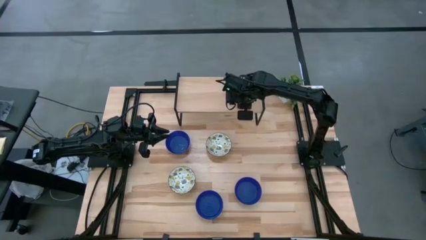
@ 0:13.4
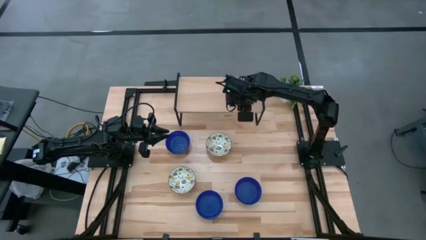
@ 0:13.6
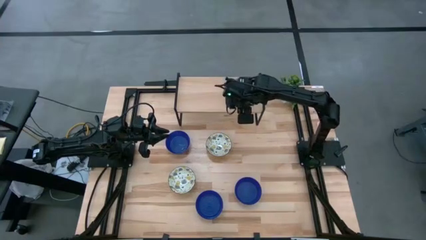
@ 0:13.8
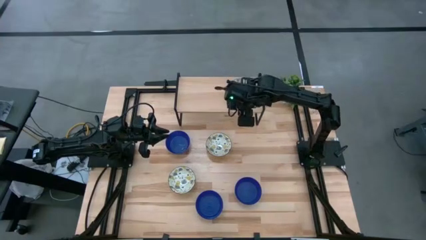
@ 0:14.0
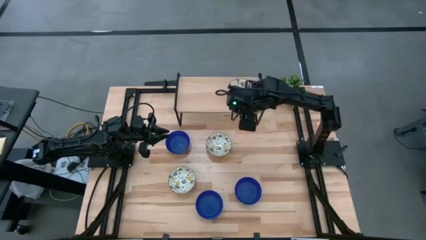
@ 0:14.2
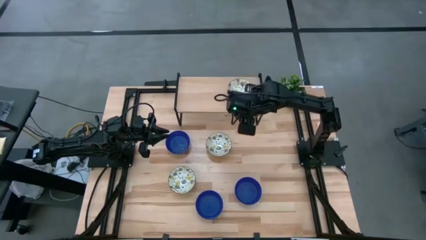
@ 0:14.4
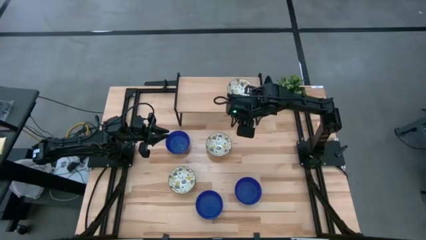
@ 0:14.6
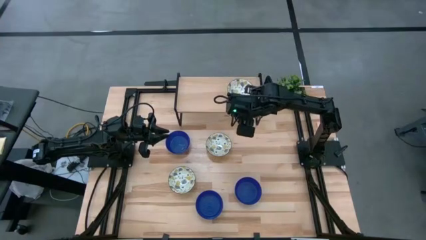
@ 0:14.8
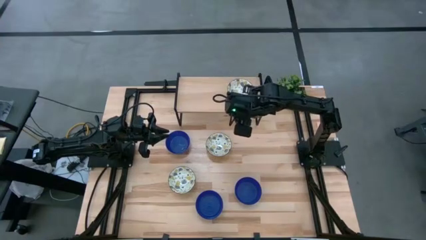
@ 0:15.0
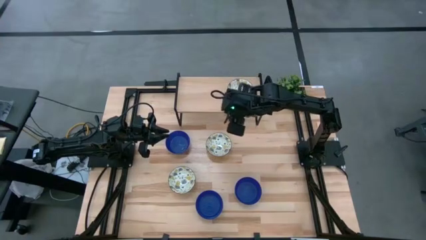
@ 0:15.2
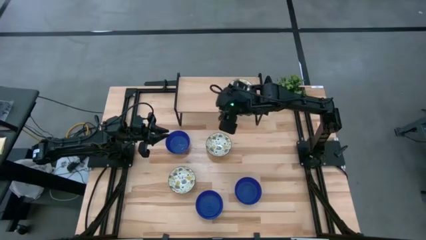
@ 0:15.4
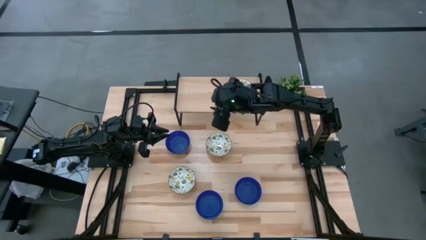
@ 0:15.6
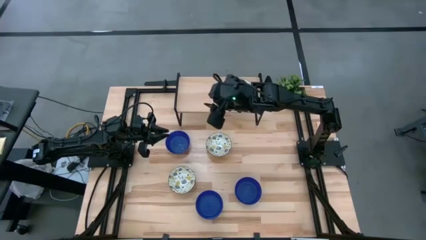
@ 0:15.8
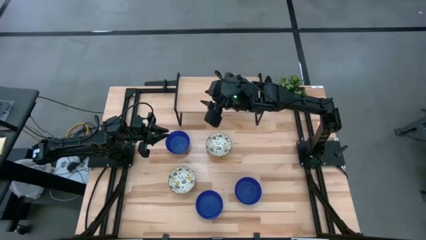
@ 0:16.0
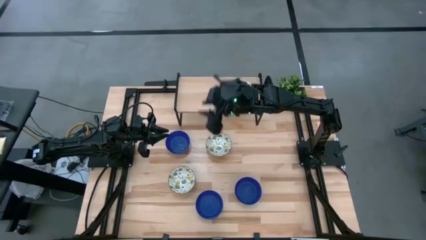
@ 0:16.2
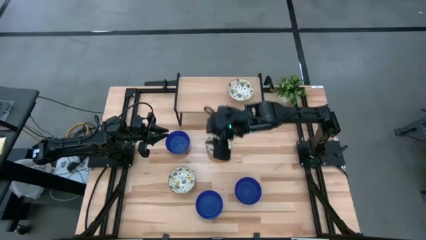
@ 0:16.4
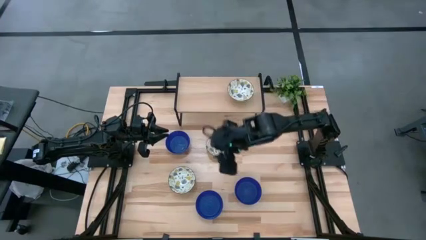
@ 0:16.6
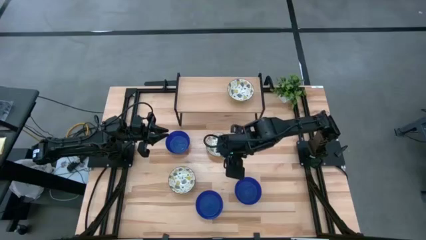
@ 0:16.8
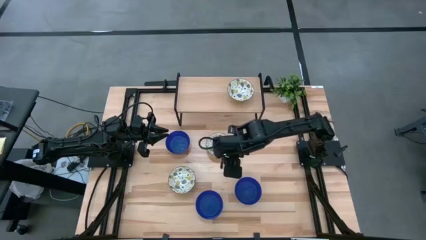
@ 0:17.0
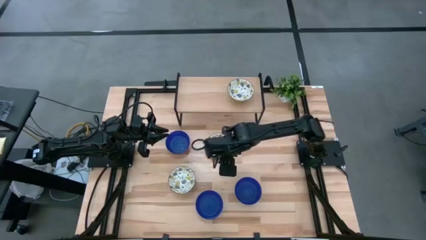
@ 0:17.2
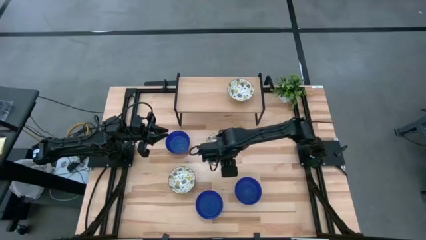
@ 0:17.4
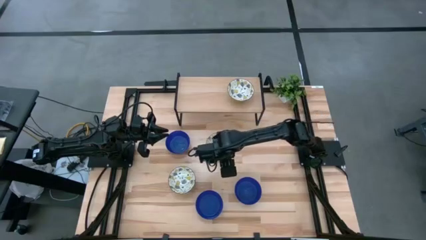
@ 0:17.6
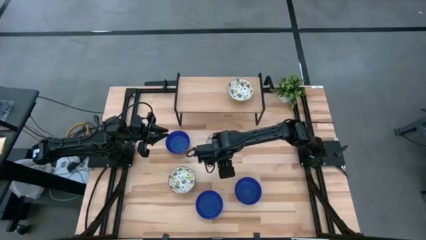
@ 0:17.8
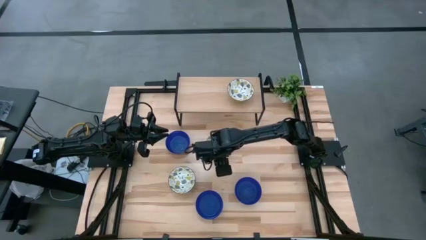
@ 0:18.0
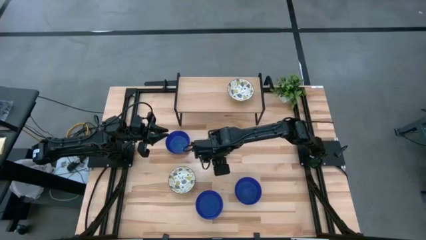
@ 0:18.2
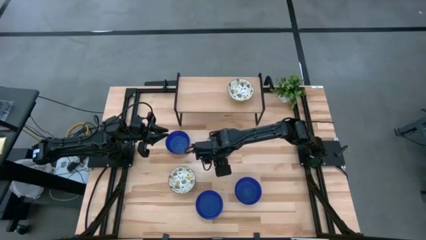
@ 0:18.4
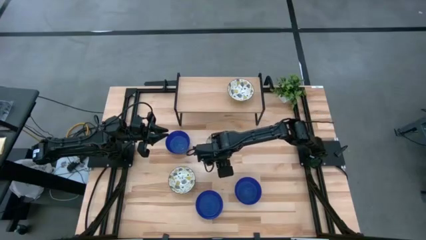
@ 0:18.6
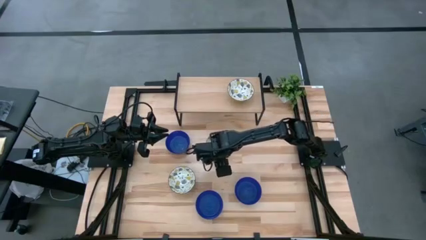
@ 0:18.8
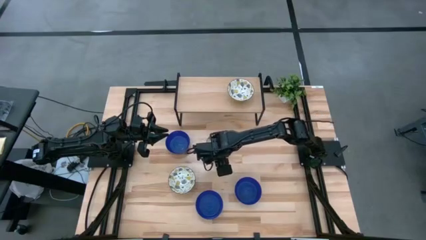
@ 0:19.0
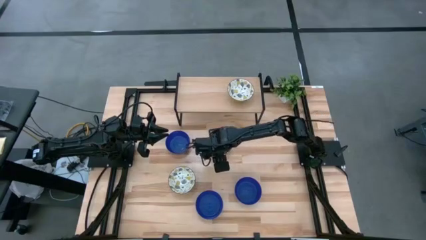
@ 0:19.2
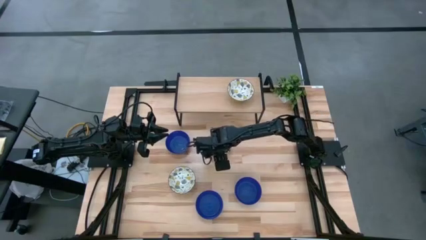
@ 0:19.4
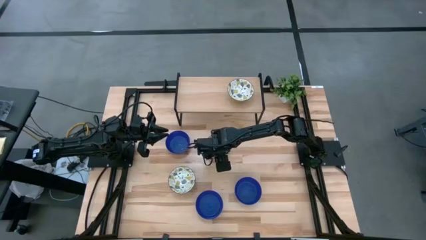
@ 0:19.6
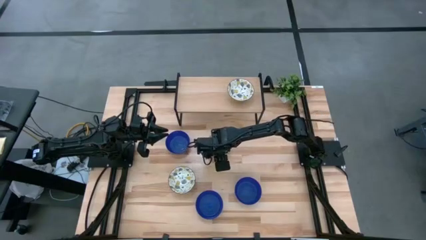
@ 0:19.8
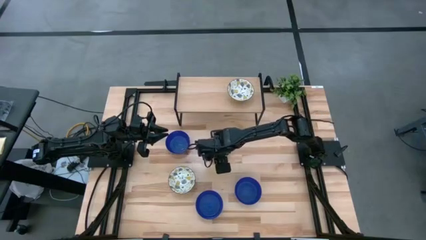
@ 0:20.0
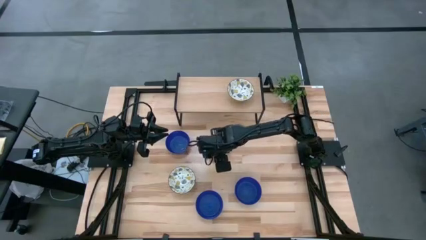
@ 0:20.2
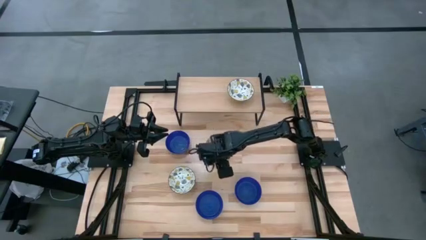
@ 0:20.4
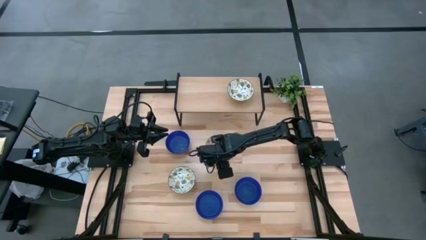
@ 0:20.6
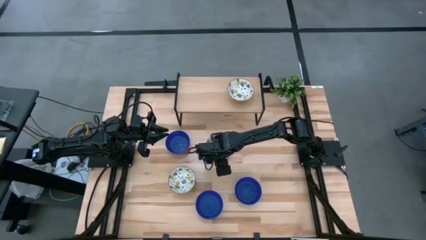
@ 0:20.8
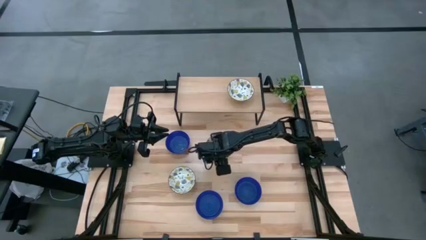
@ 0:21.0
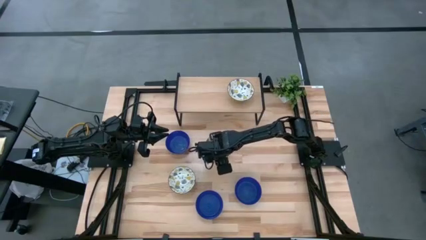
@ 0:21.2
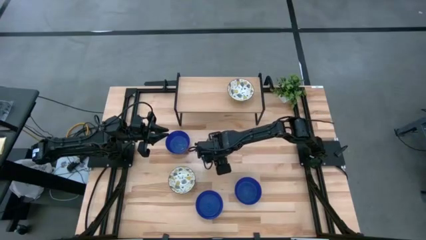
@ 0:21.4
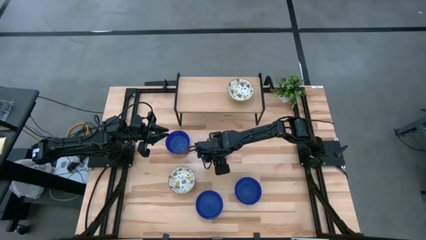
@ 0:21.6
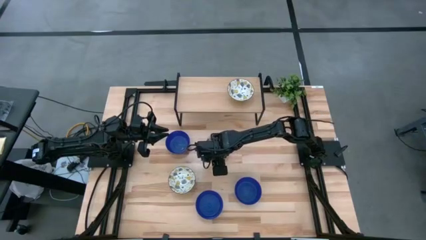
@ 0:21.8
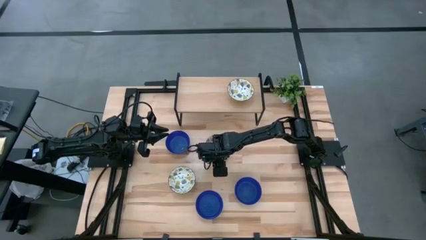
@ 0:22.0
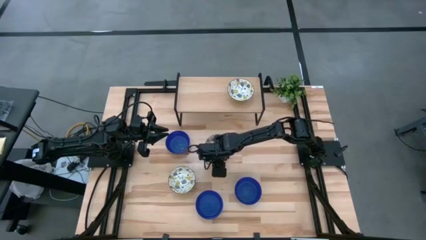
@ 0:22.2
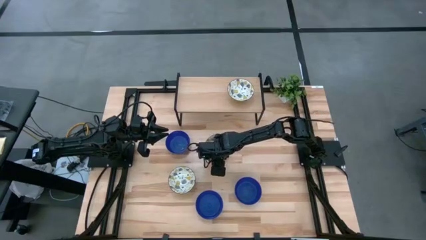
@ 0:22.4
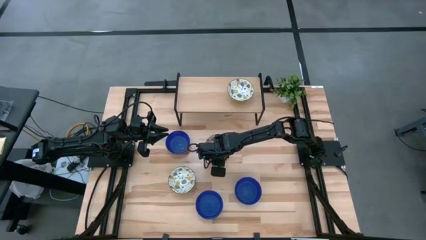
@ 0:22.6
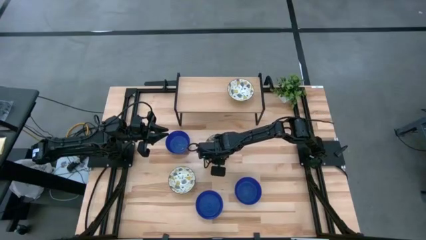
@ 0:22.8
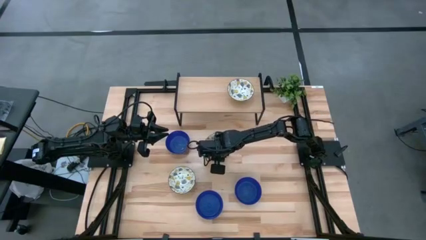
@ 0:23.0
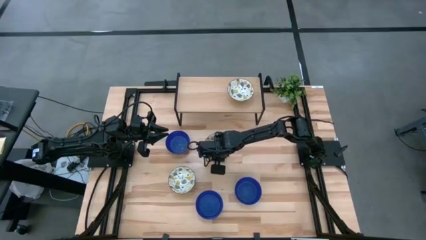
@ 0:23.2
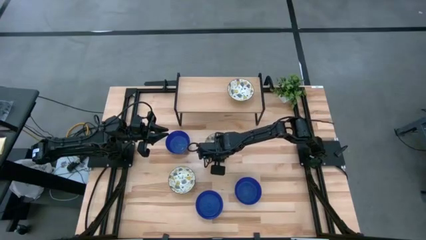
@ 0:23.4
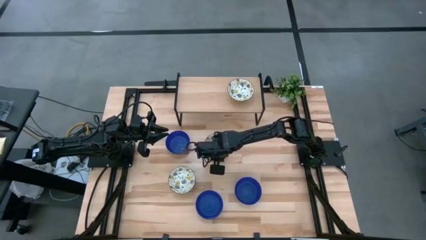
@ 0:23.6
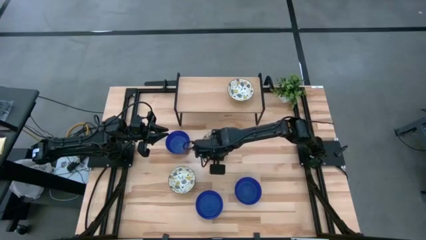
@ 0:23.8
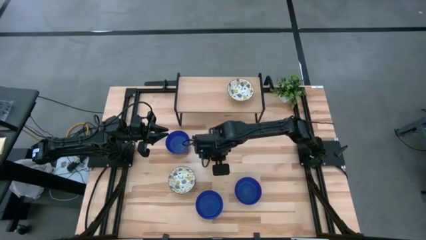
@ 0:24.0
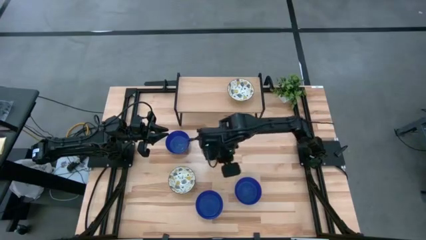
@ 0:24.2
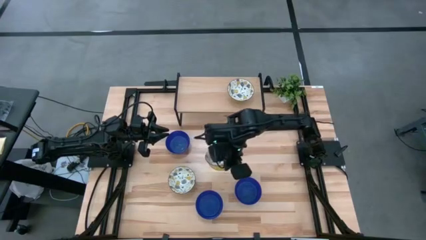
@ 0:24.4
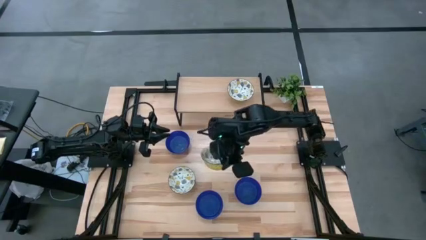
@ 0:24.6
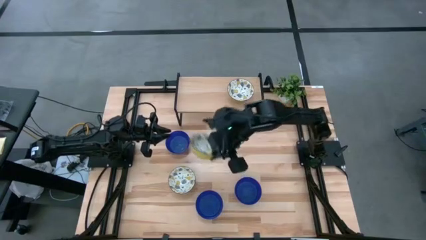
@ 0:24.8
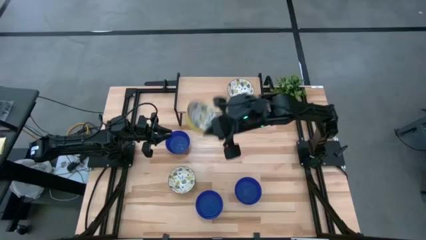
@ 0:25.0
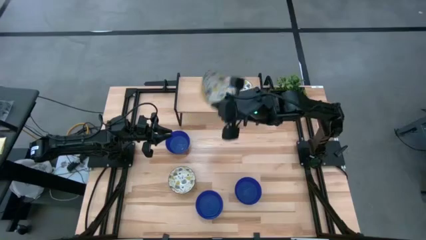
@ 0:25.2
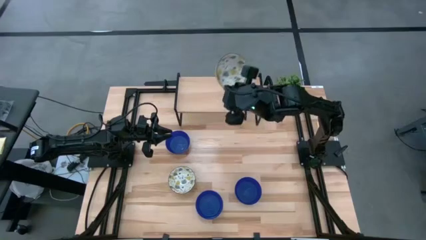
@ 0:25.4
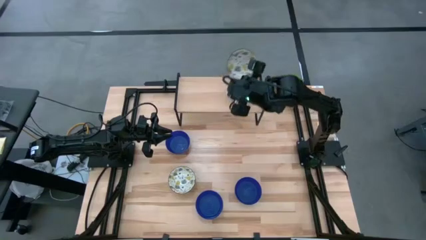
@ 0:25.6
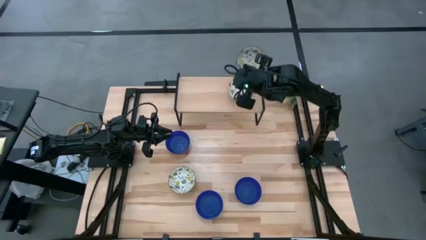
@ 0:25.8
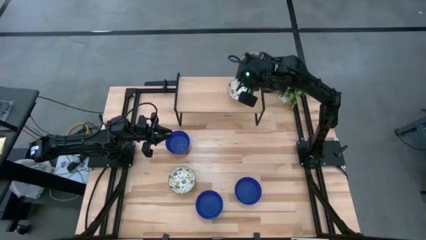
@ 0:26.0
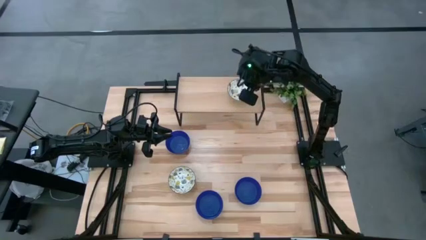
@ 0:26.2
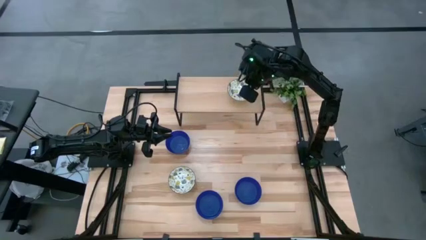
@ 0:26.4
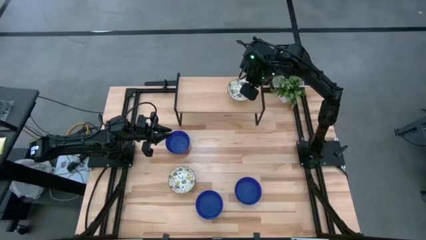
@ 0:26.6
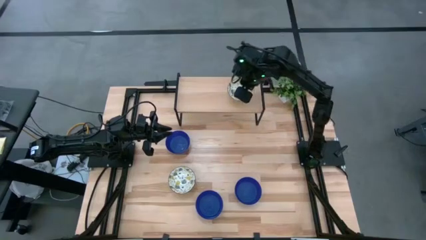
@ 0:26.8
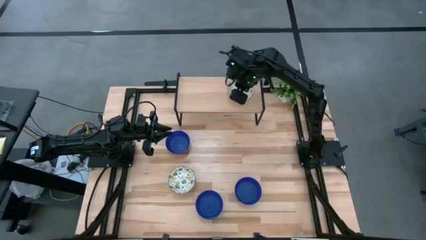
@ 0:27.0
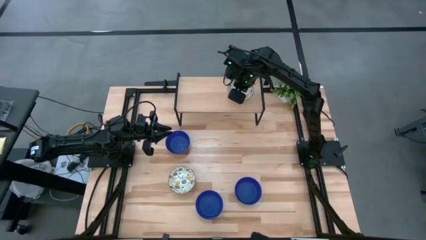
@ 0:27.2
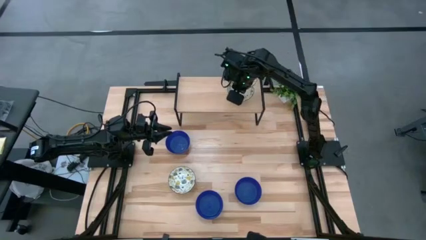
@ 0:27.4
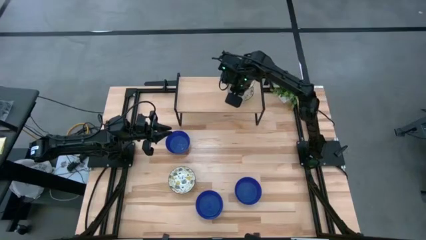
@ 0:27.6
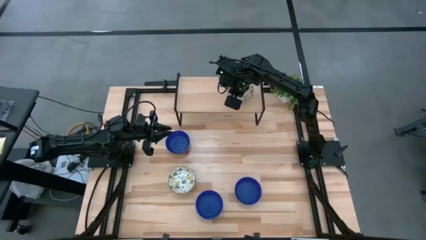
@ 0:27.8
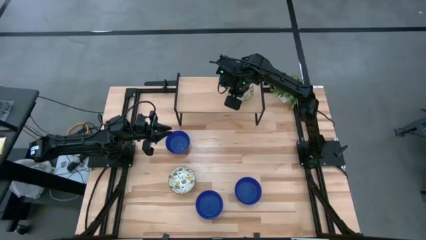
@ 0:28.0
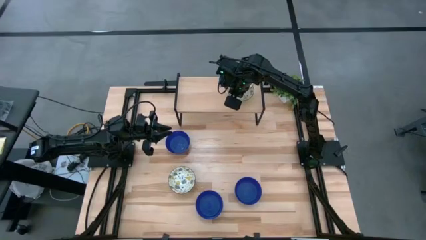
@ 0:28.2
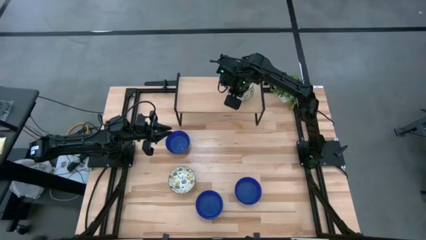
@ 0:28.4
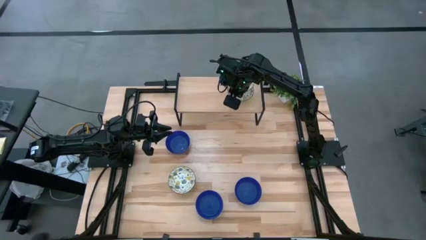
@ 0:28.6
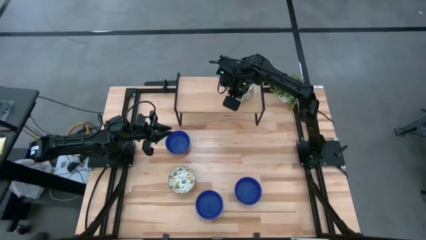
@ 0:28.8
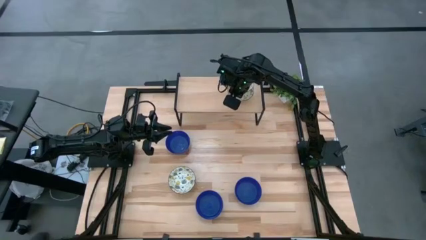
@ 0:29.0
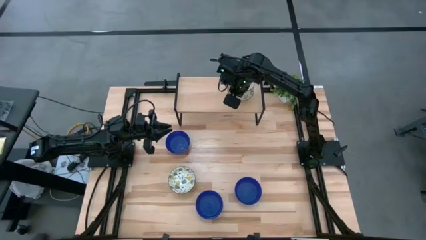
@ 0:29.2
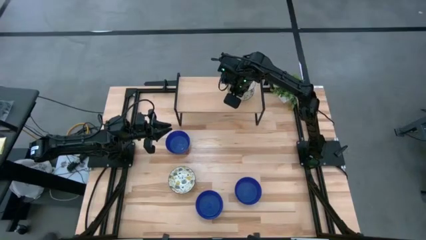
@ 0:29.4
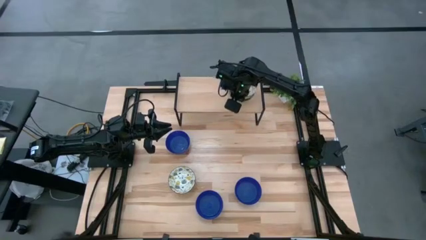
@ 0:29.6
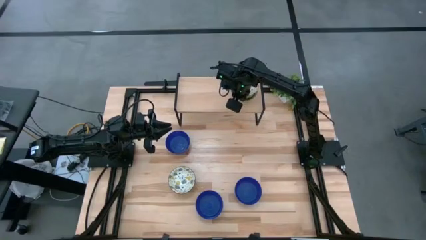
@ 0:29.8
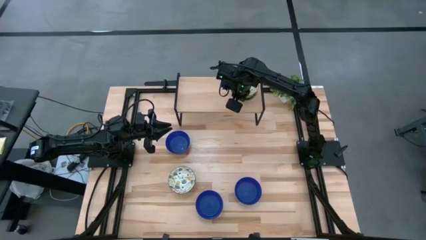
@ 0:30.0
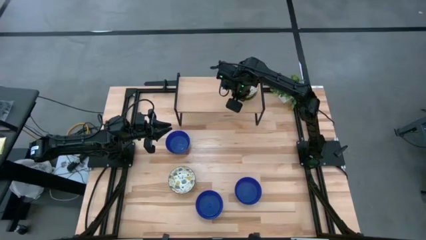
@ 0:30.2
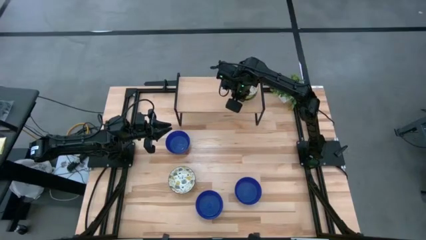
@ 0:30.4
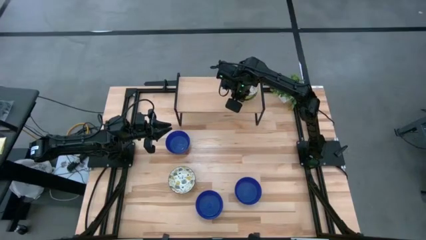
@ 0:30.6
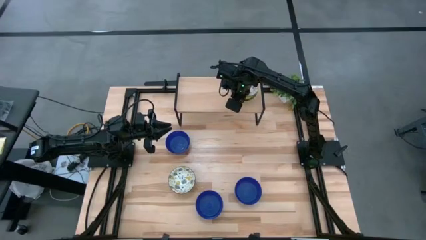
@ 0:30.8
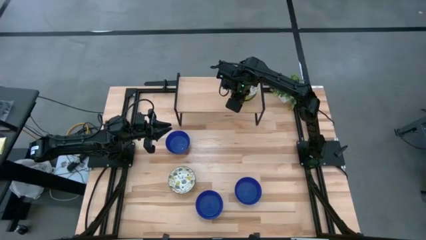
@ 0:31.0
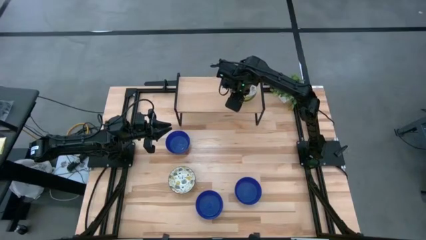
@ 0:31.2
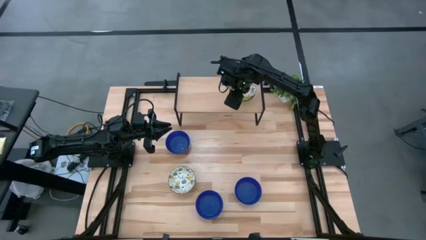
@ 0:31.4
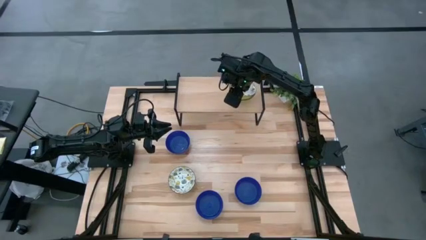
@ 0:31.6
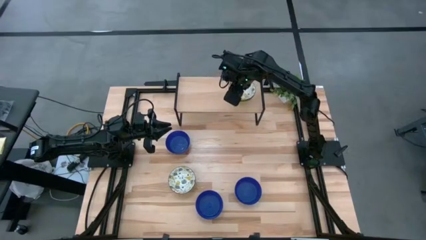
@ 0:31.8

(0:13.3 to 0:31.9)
Task: Pick & Place Mini bowls
Stack the right white patterned bowl on top of the white patterned bowl on the shelf
